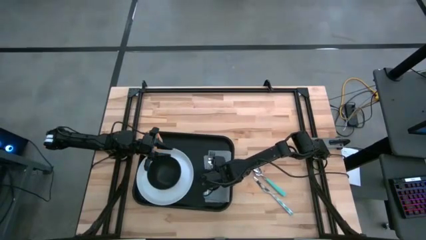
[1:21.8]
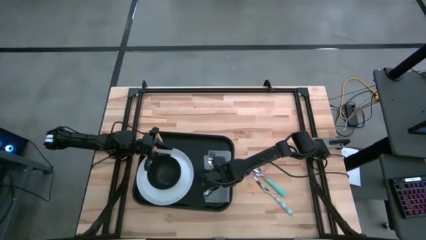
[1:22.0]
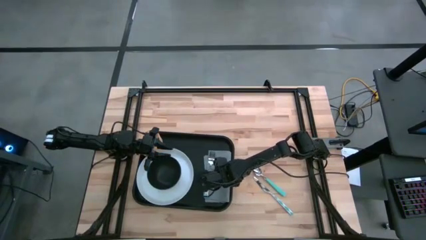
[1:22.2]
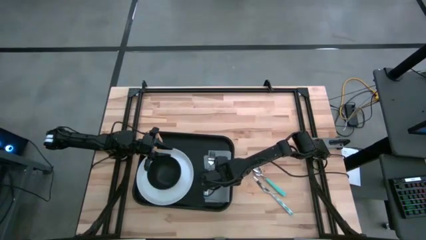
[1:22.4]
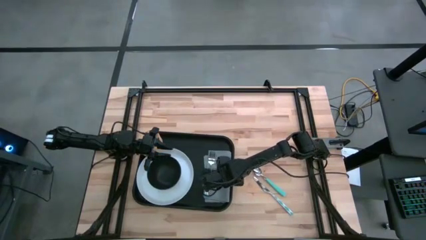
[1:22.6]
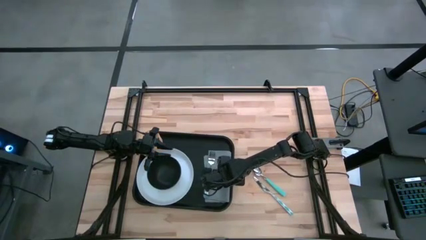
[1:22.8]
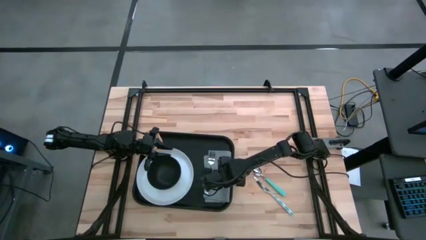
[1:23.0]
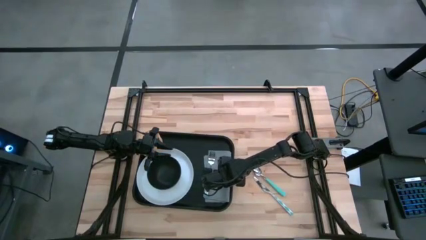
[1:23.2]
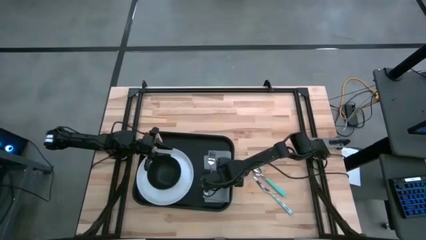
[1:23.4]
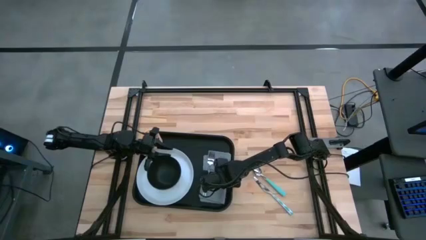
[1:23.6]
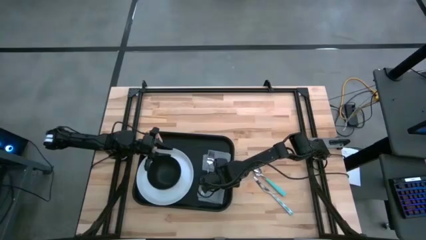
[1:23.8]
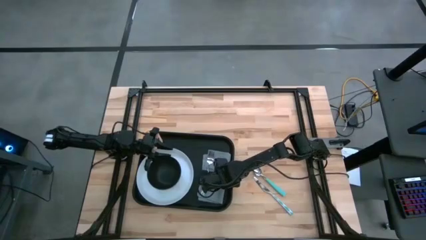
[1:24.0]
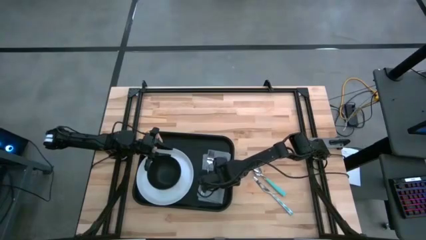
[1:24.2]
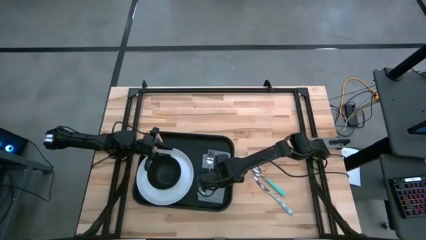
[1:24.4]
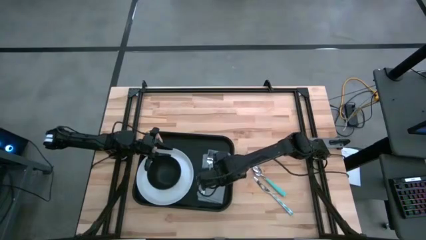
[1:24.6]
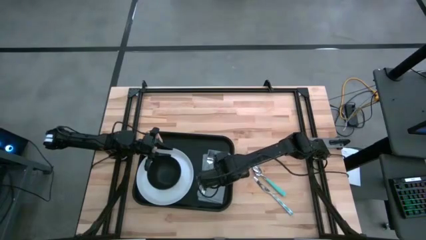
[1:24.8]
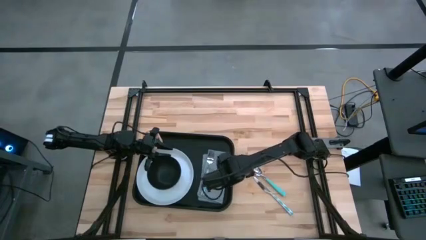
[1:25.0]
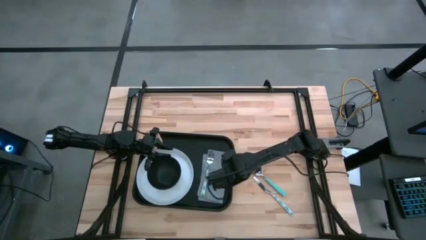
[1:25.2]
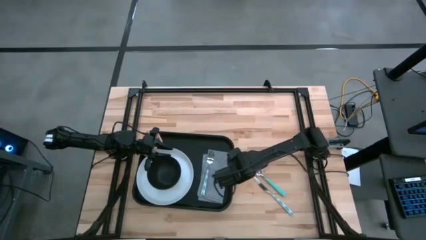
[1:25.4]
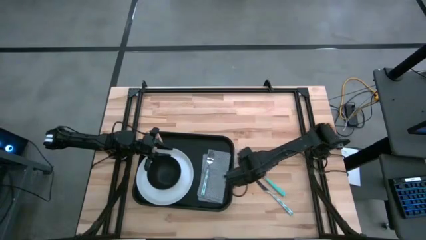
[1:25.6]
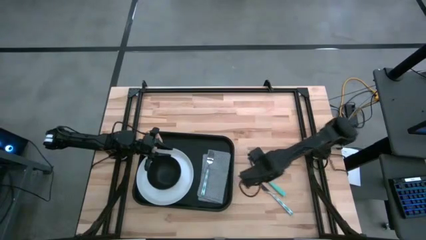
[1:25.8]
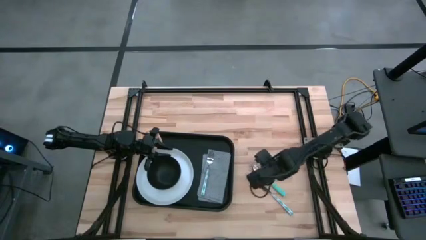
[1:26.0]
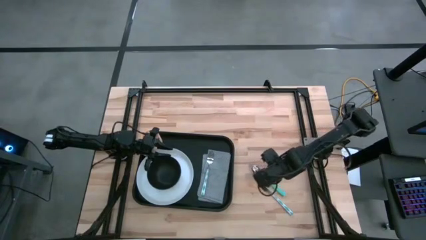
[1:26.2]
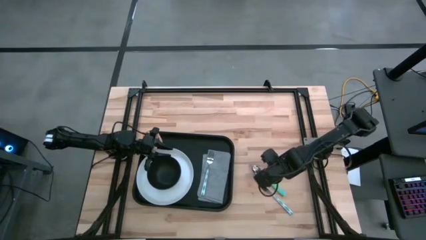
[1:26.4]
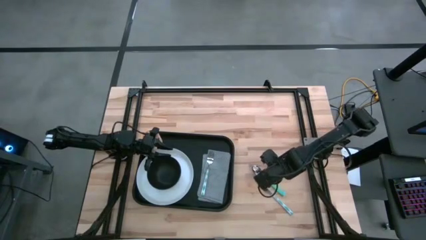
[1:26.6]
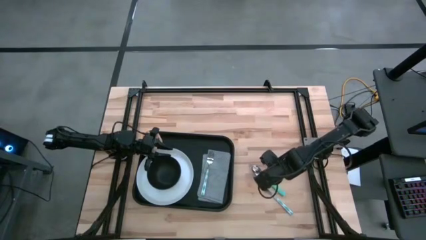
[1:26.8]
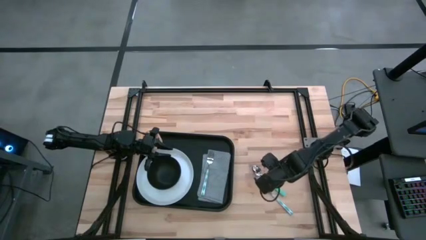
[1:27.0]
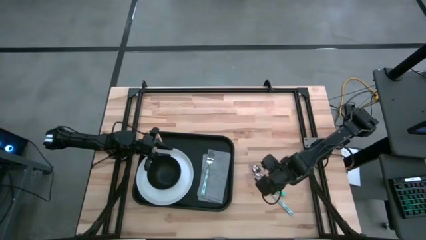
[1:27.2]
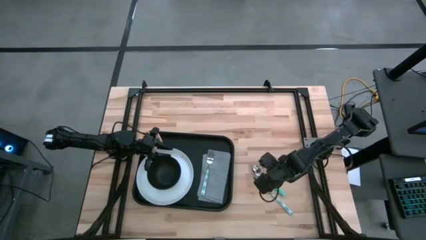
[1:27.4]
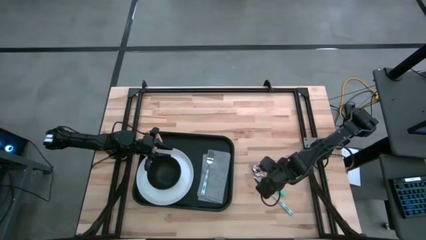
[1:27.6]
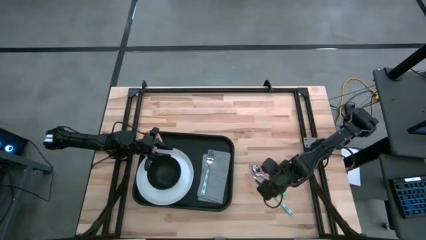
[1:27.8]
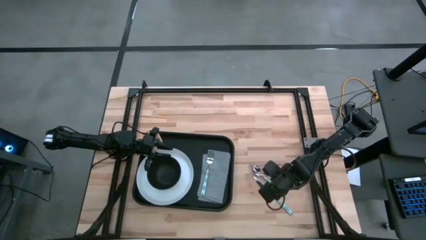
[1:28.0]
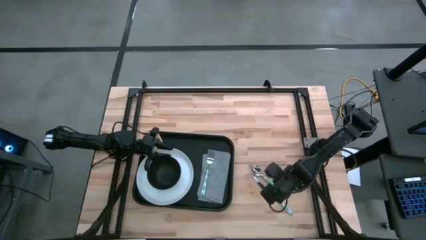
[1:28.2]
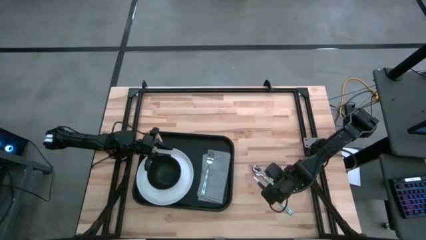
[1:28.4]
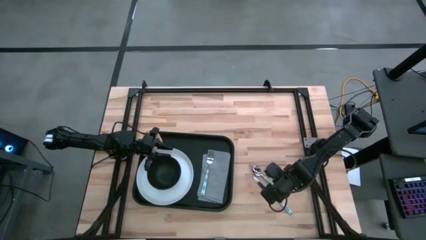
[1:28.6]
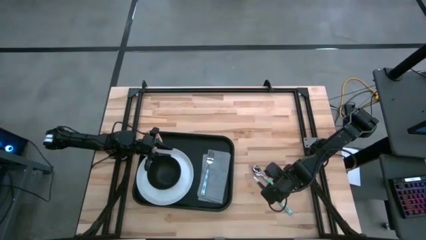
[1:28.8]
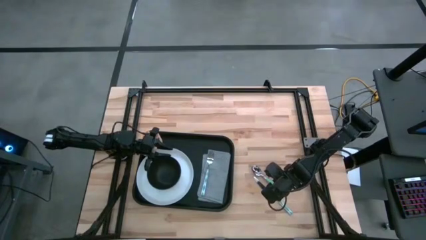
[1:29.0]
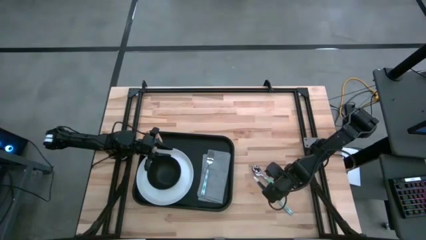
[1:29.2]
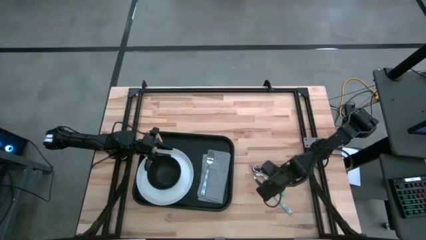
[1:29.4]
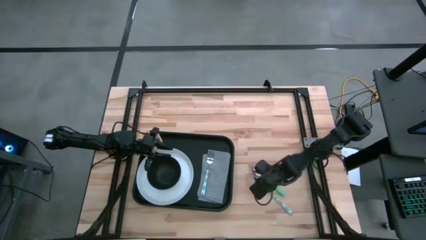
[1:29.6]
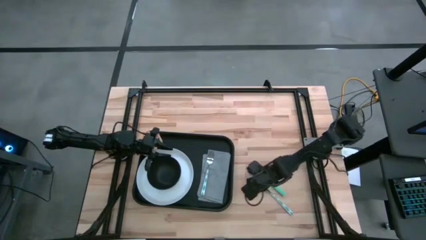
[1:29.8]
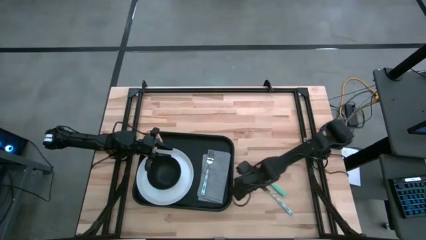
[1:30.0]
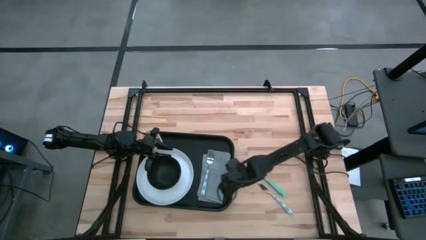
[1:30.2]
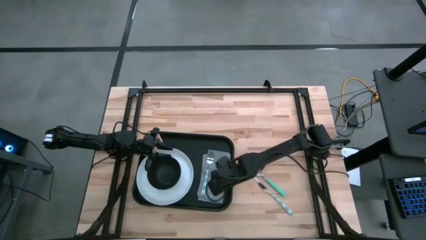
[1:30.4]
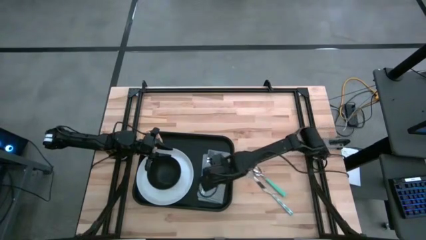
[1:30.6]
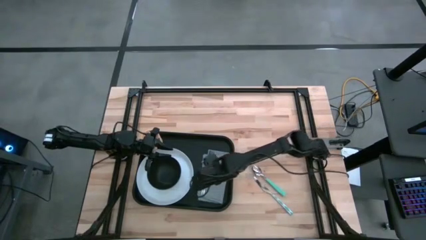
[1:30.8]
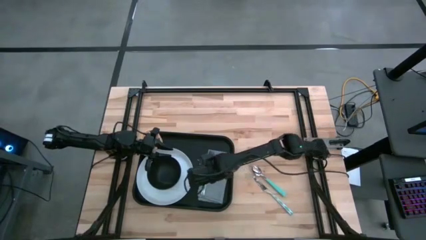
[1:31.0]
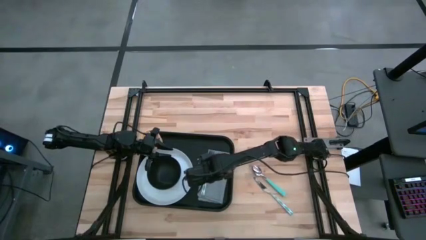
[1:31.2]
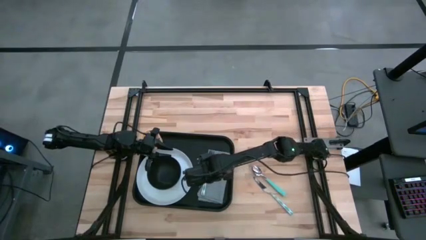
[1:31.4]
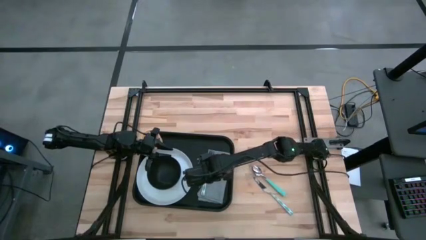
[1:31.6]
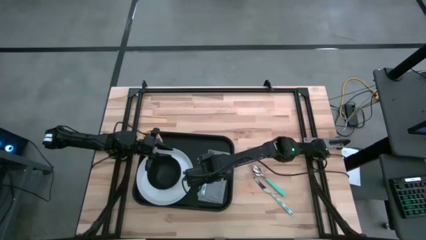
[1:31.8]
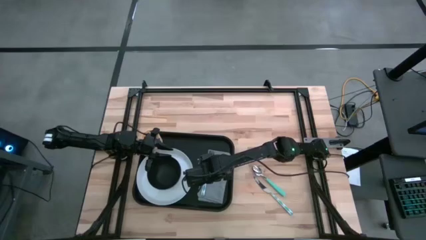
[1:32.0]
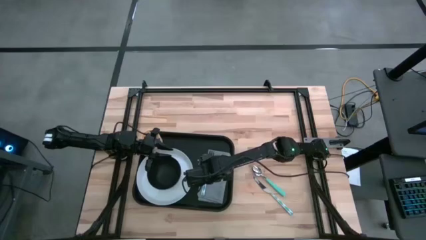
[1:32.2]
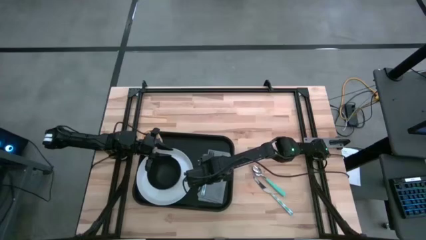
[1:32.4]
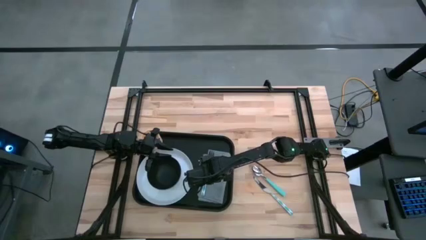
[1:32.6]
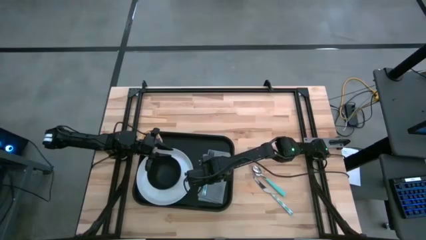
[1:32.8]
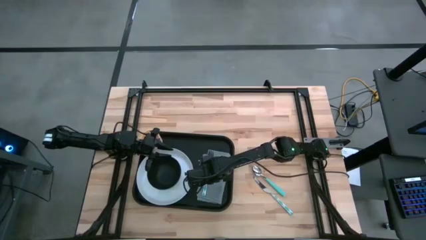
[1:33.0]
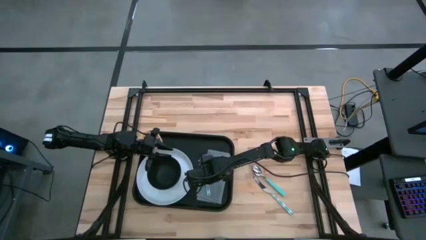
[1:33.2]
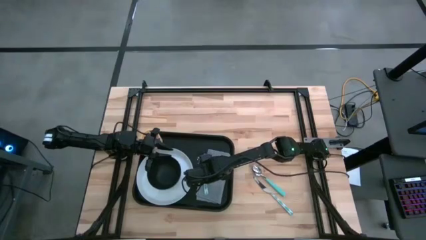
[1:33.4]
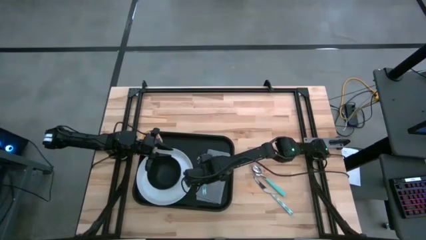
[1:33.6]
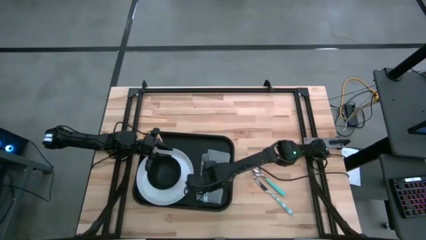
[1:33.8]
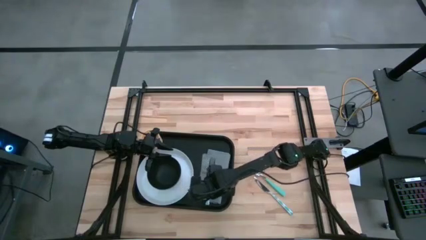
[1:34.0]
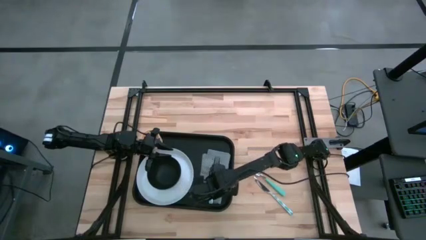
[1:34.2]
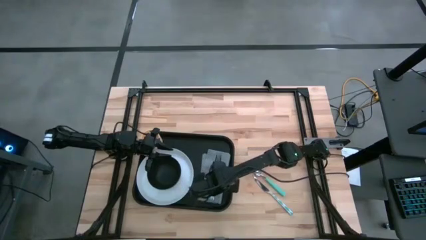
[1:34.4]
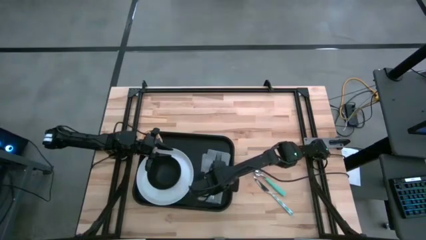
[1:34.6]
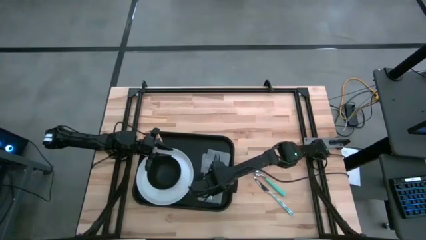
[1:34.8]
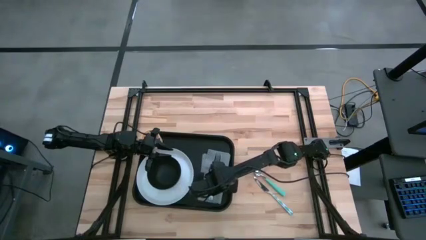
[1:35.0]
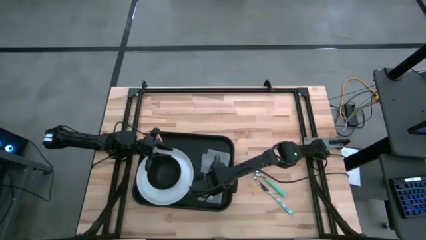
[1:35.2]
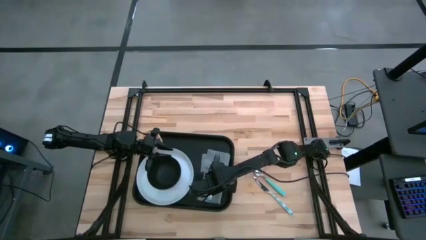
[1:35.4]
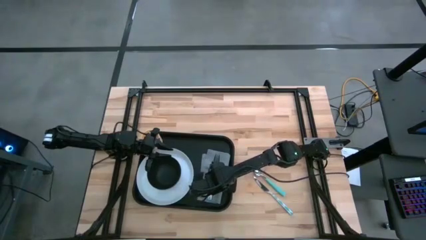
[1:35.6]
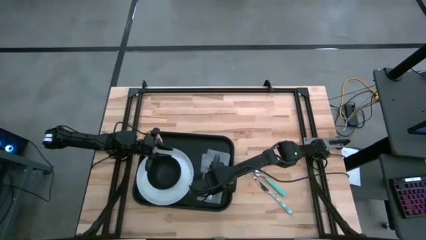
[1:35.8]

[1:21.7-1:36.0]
Task: Set up tray
Adjust the white fork

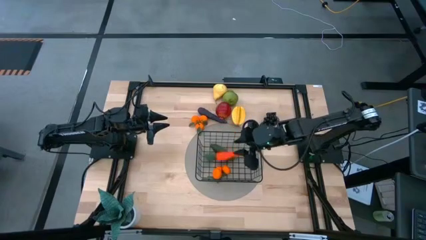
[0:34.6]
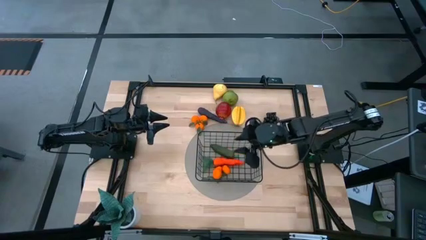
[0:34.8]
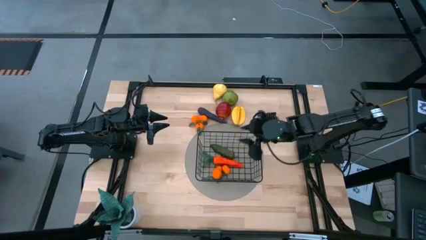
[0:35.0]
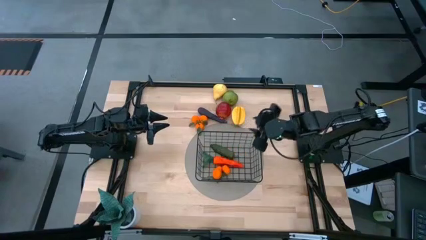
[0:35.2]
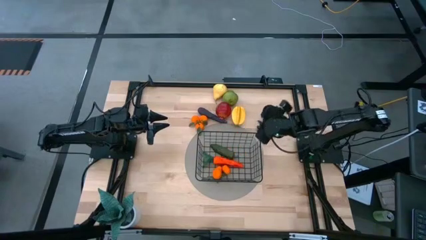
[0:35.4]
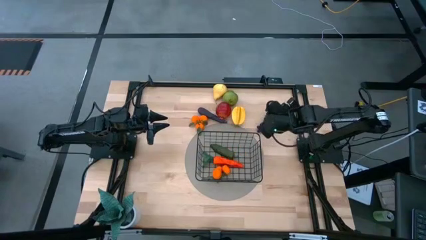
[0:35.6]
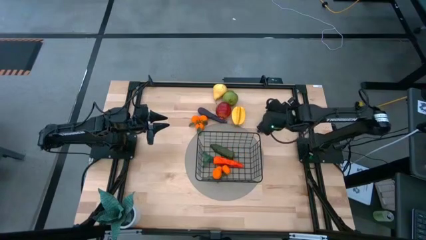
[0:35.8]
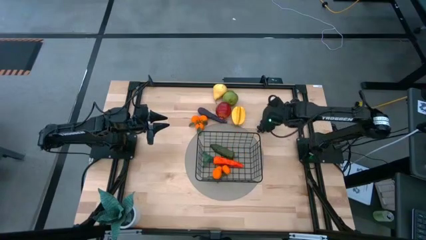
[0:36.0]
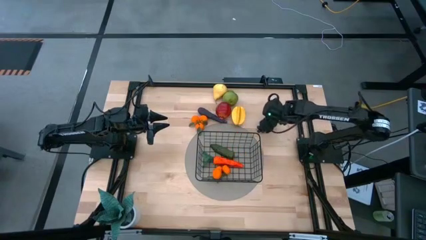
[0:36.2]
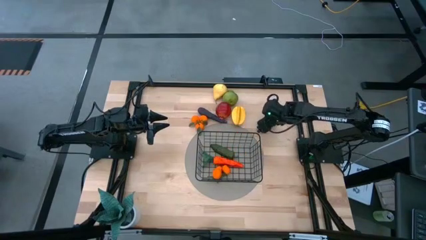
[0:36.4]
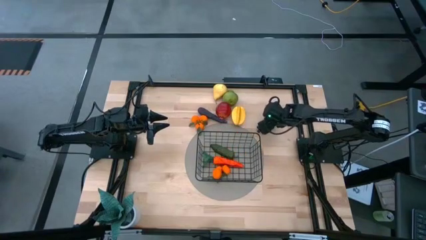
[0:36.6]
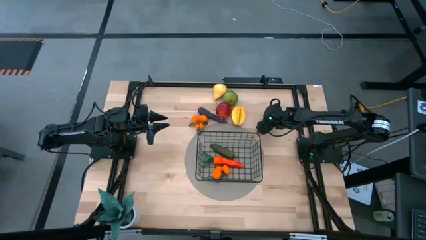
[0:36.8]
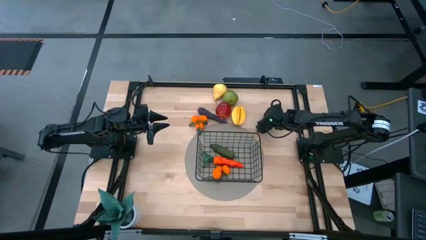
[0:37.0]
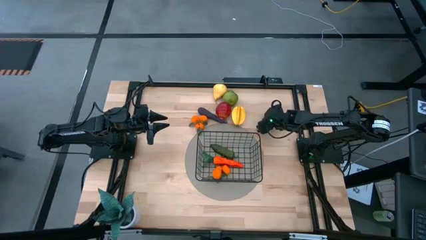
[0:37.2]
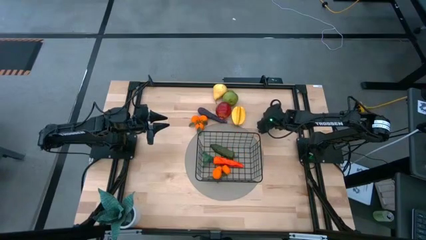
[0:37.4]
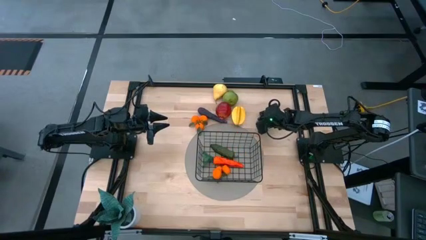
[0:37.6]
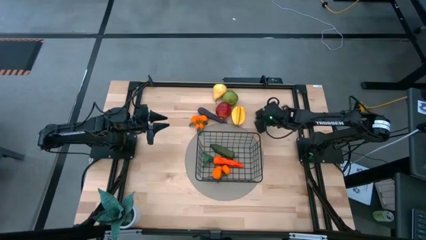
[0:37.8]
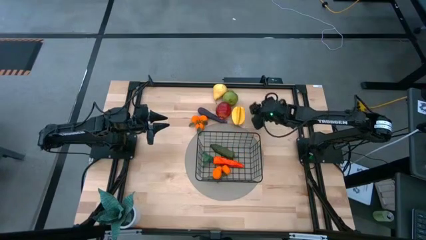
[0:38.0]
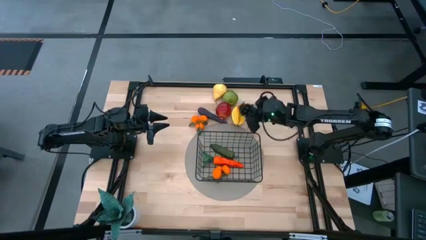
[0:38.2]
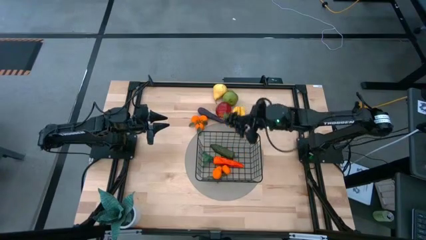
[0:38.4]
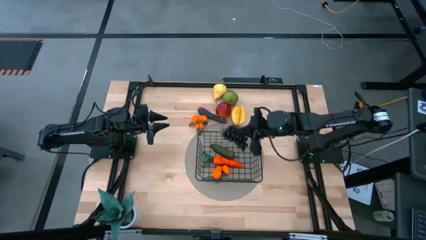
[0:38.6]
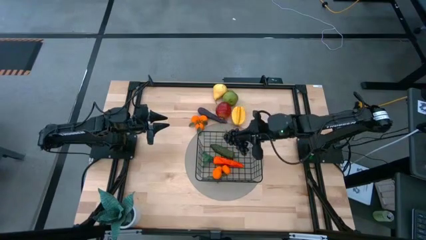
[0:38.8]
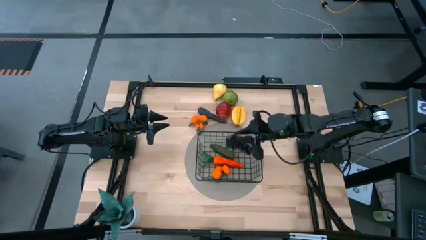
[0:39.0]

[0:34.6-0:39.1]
Task: Build produce basket
Put the grapes into the wire basket
